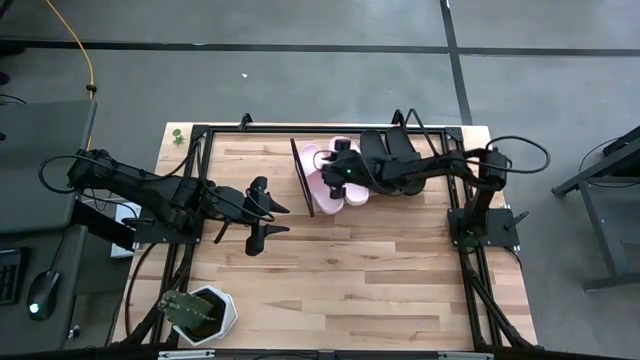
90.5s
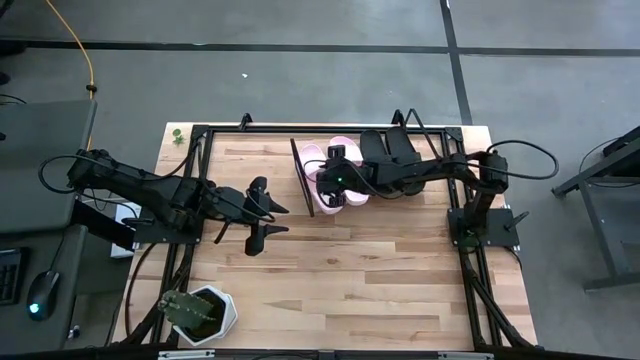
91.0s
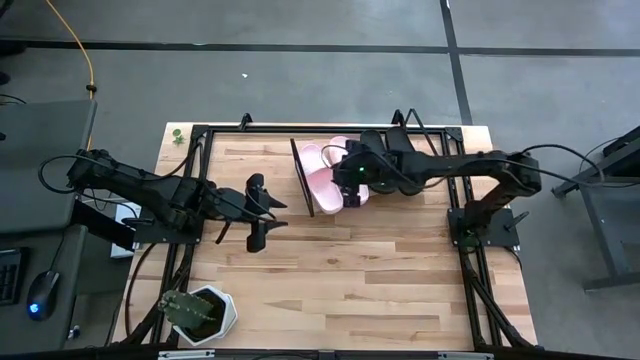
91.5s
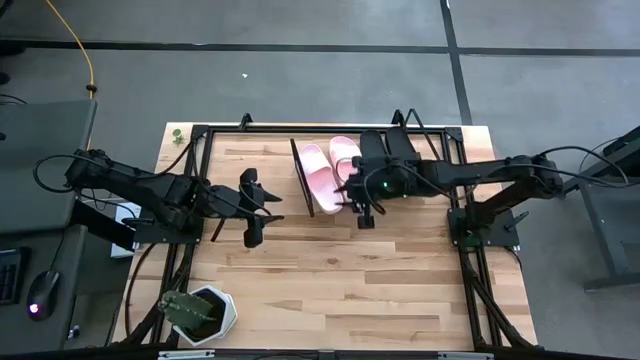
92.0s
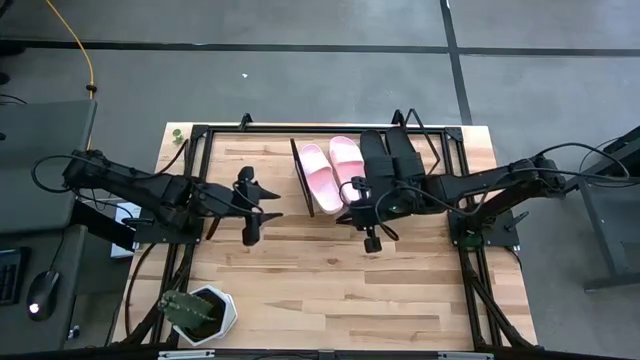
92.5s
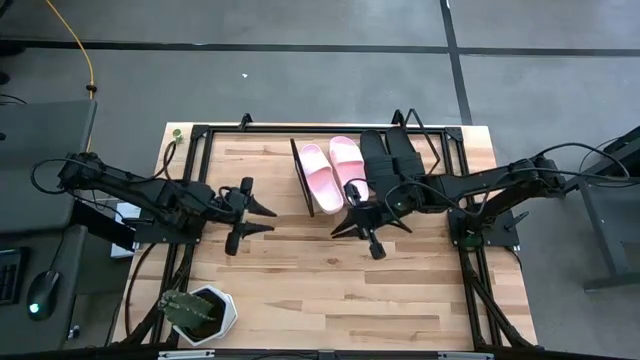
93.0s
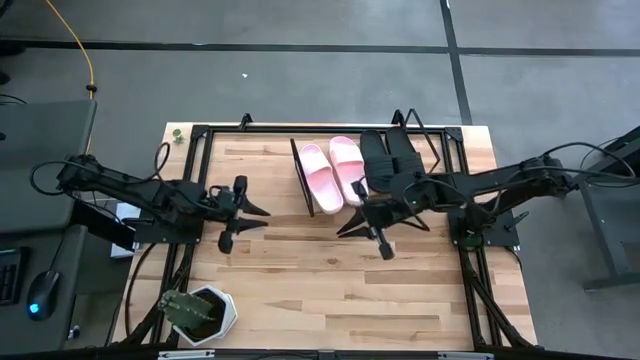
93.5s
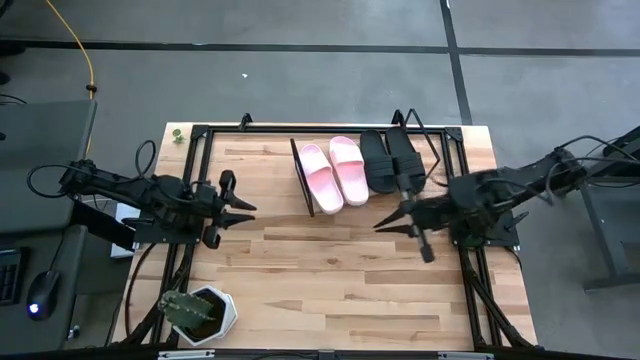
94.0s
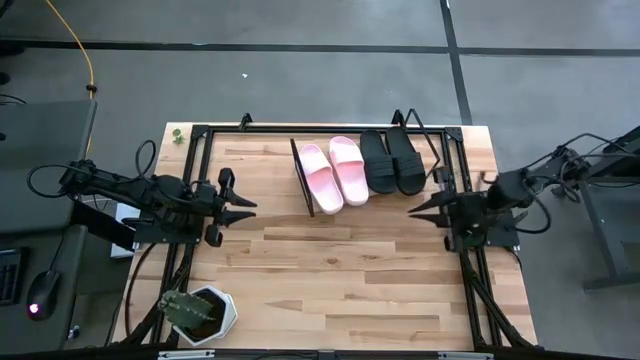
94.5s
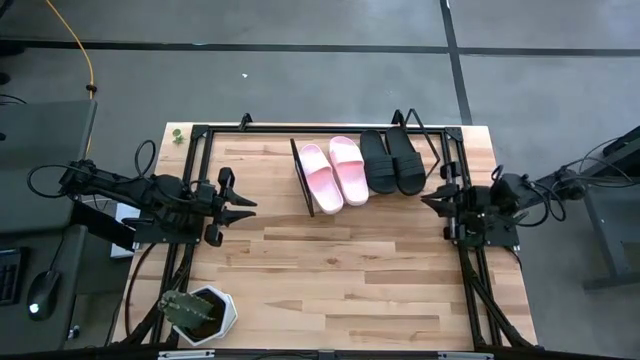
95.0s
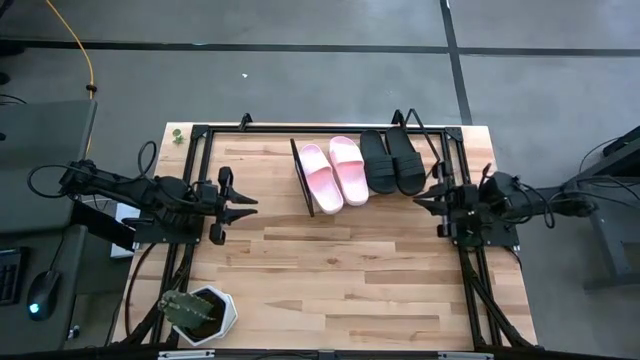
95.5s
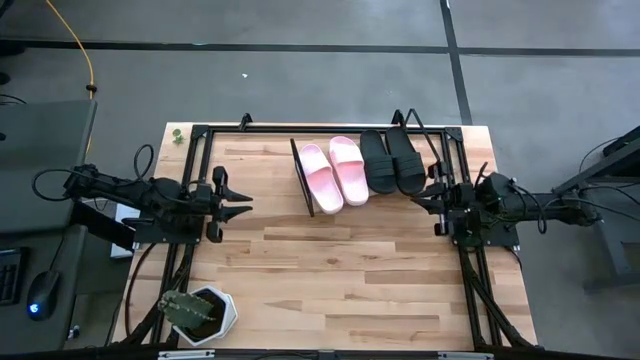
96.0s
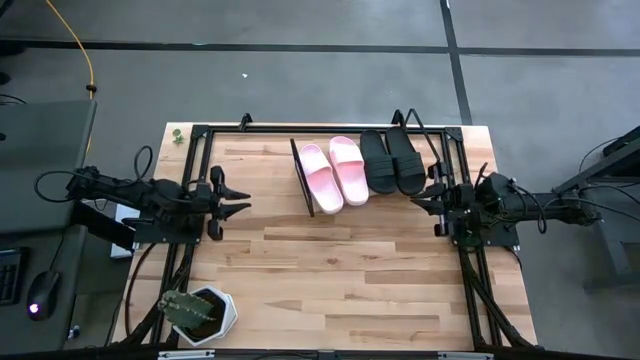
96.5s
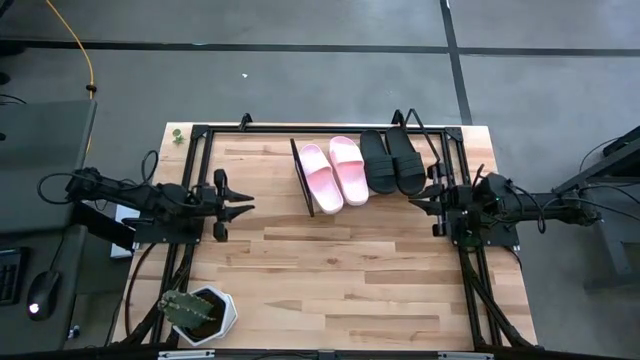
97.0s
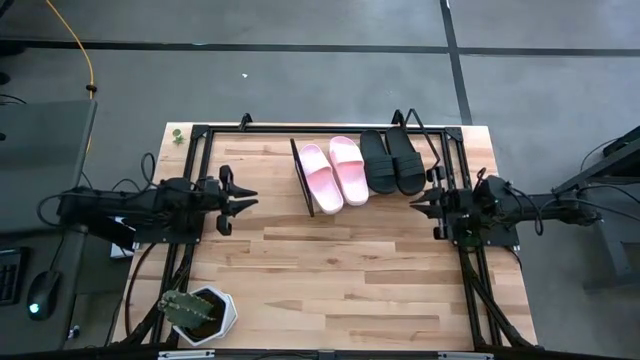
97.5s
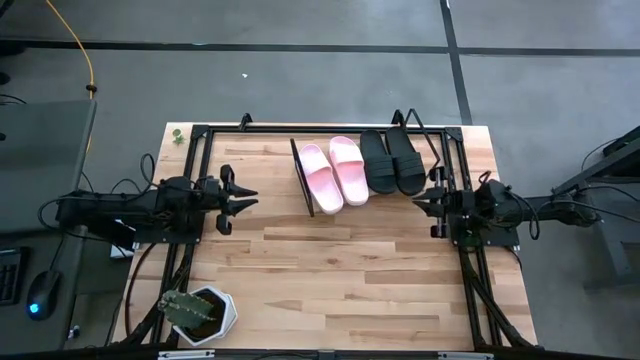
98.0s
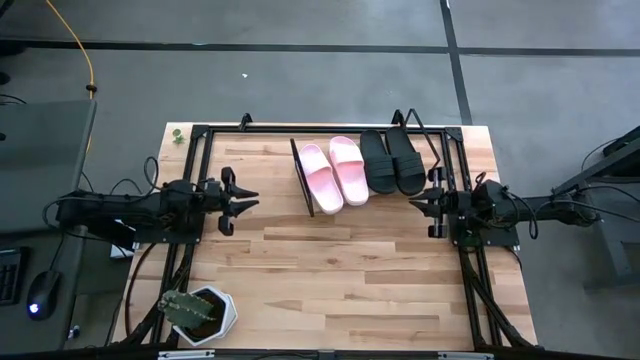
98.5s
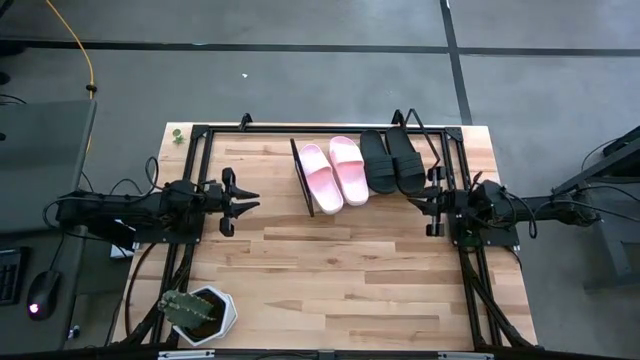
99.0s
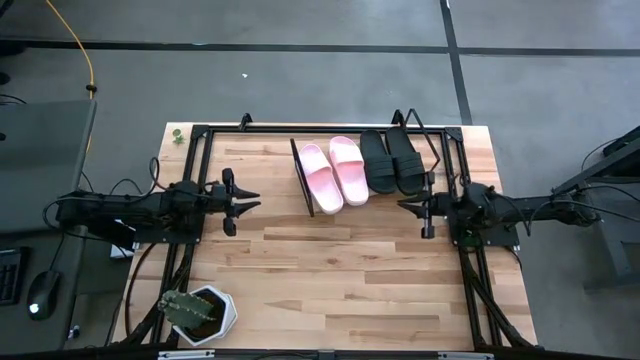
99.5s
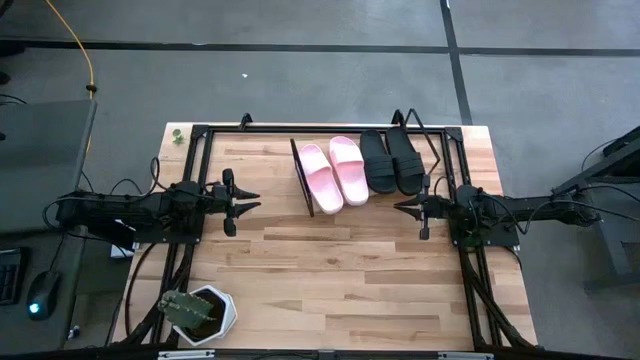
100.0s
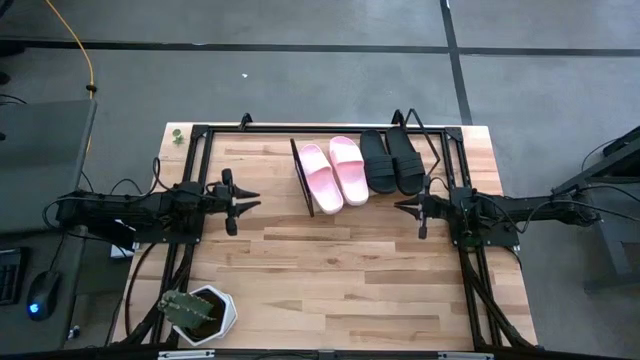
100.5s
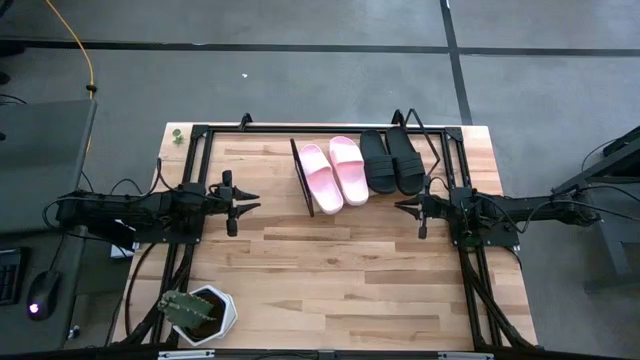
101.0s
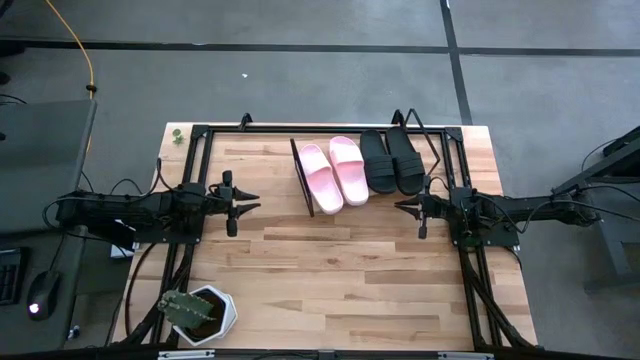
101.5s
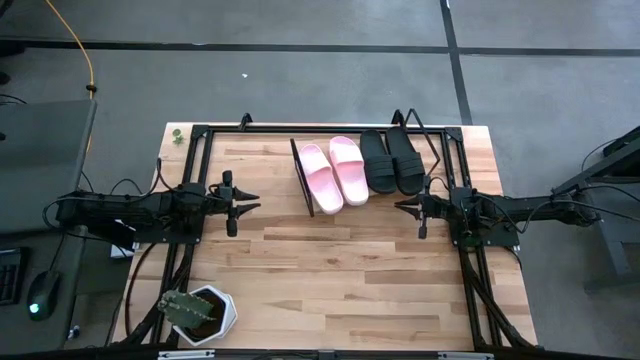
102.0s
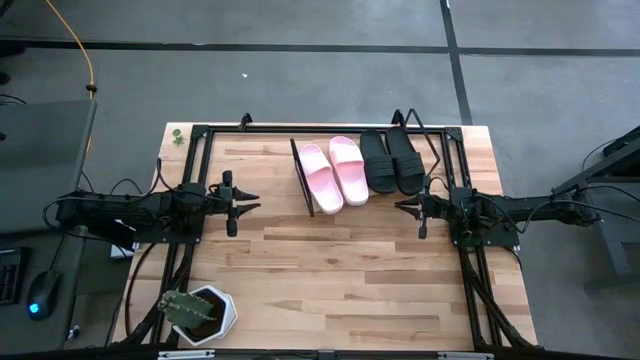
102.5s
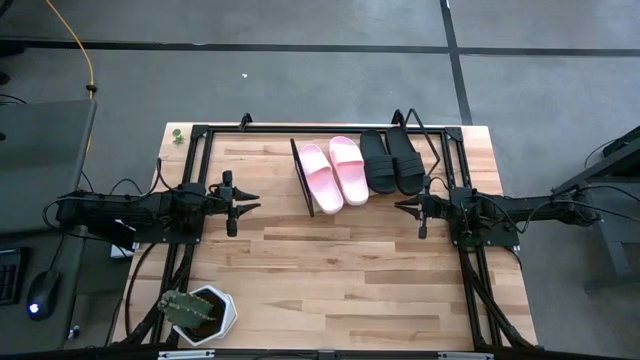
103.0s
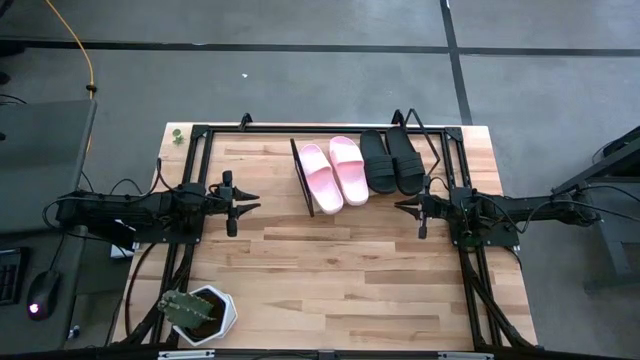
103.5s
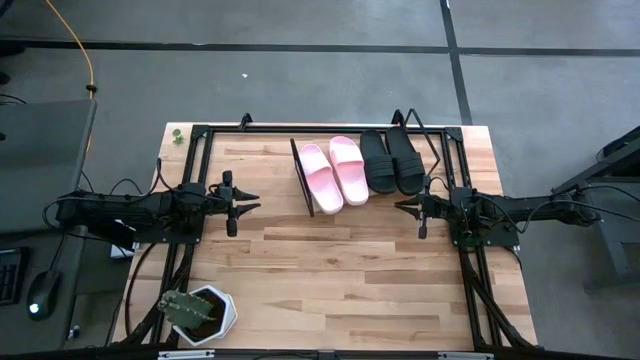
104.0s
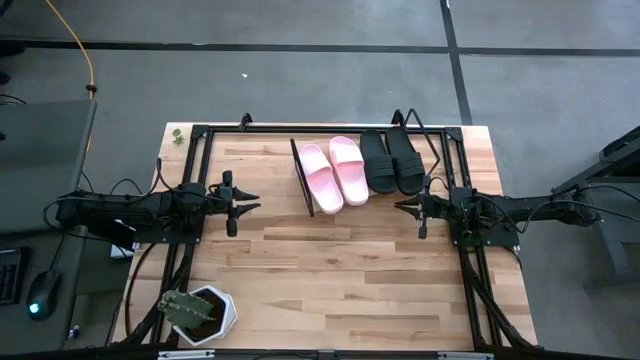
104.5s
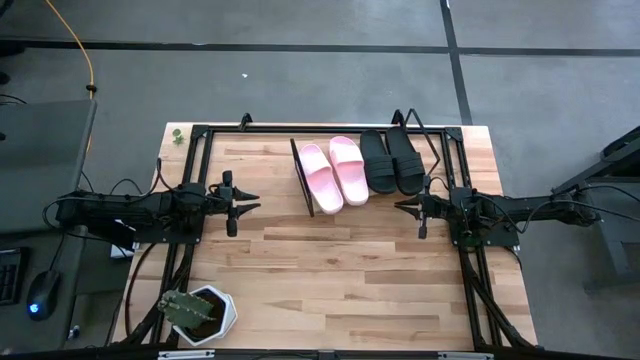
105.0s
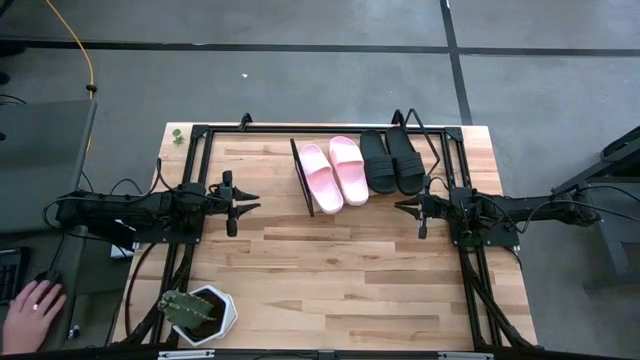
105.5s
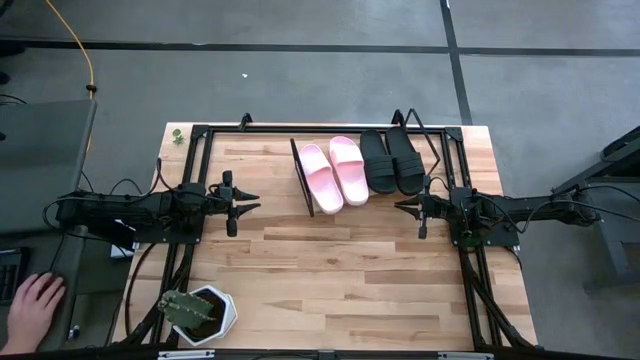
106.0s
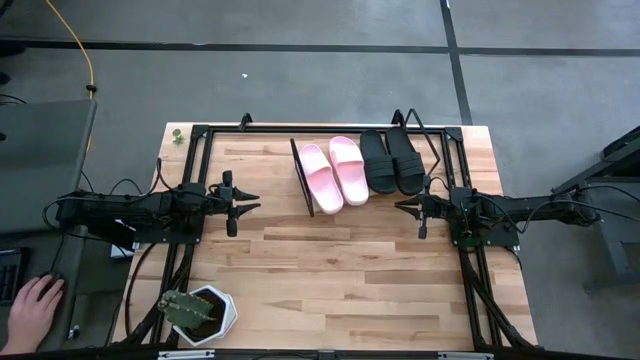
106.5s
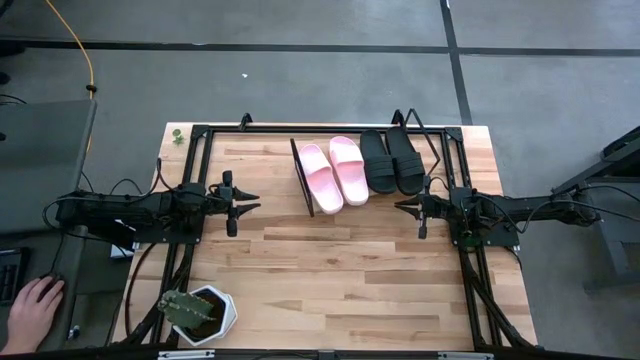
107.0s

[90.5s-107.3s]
Task: Pick and place slides into the shelf
Return to Home Position

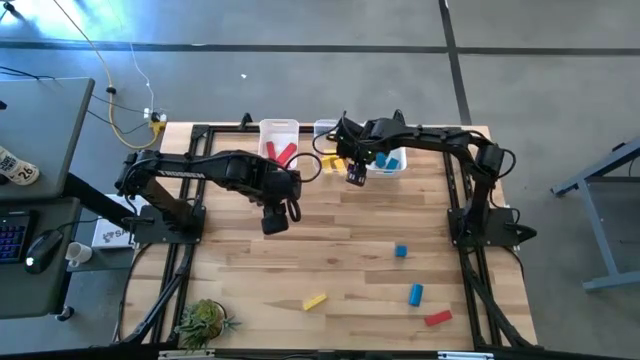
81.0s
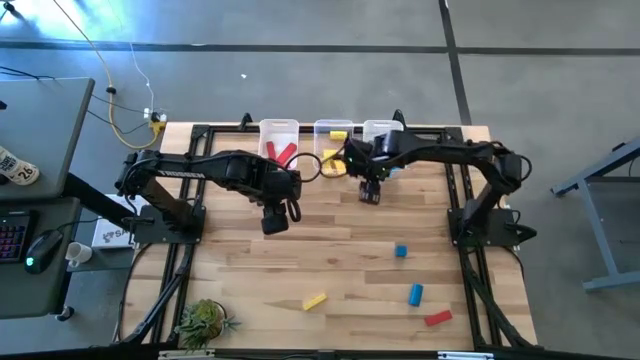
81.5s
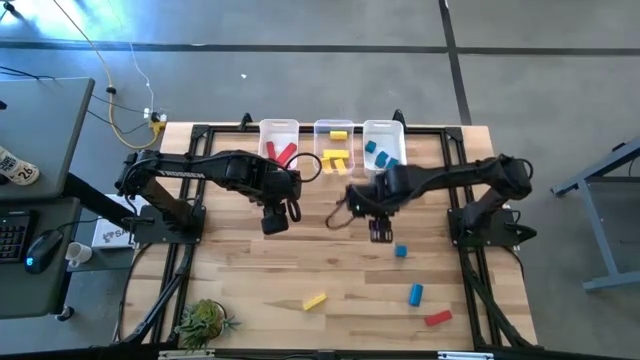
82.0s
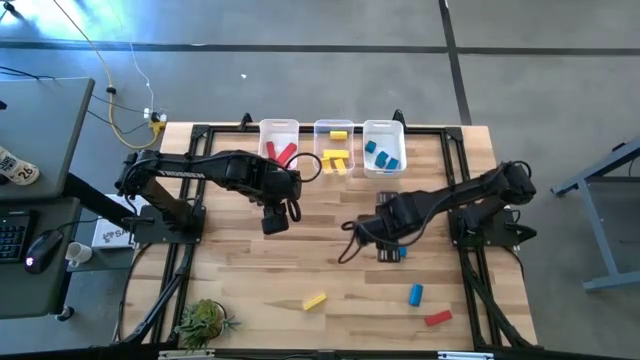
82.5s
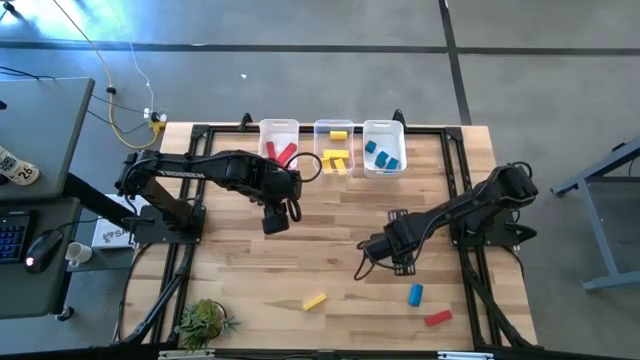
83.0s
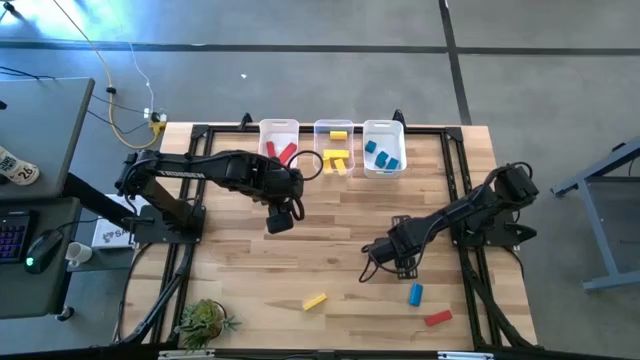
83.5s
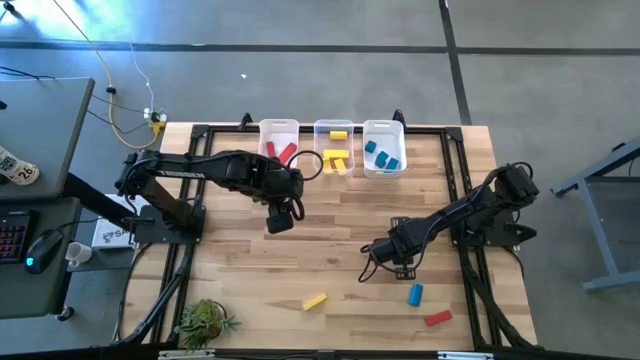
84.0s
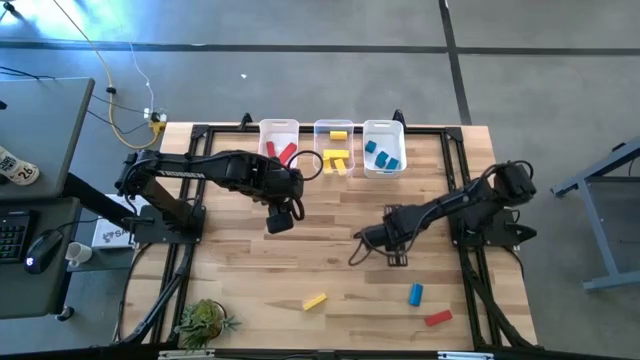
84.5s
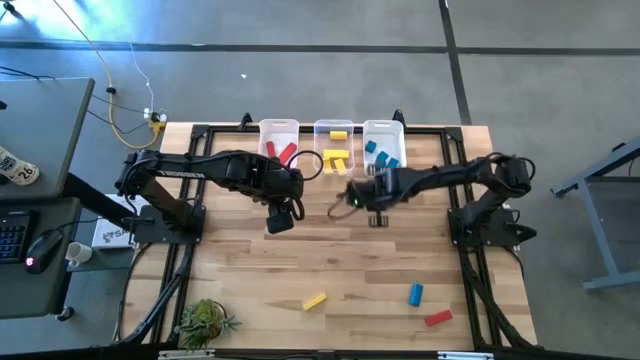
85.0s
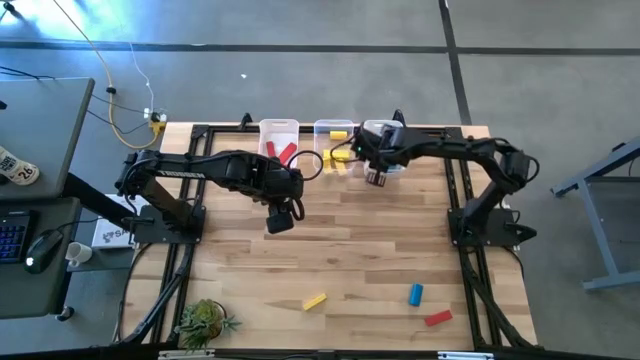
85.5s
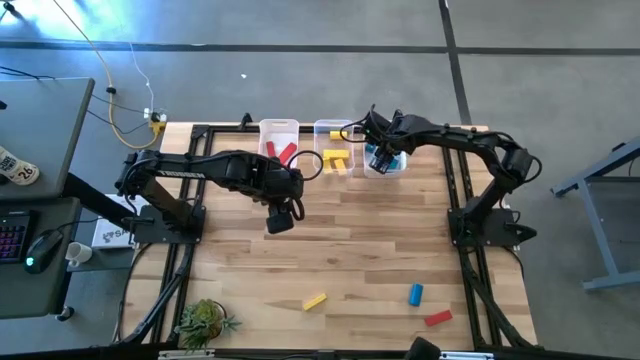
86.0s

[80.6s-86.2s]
Task: Sort & place blocks by color
Put the blue block into the right white bin
